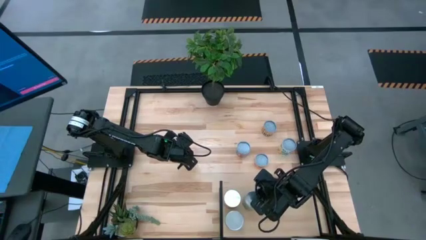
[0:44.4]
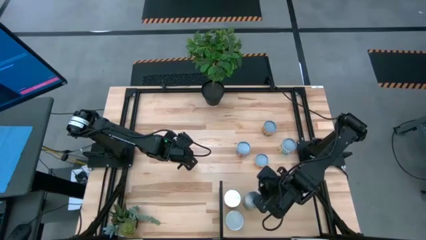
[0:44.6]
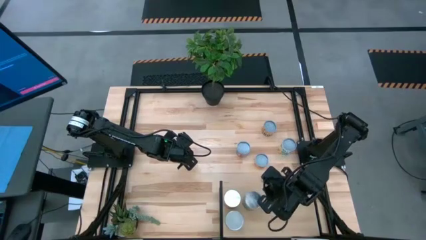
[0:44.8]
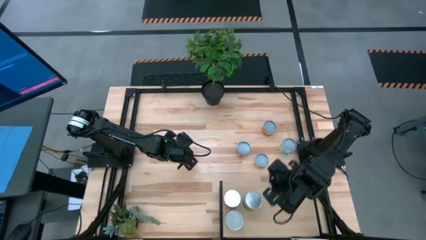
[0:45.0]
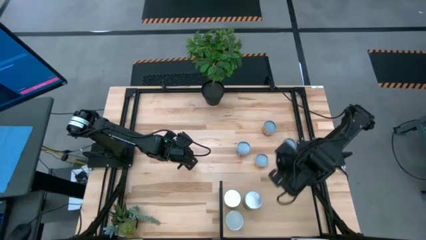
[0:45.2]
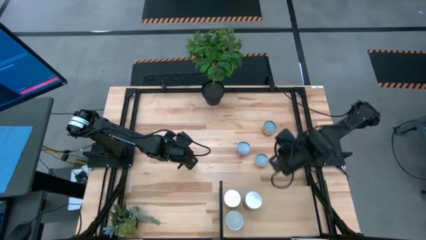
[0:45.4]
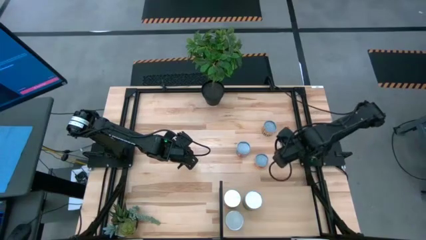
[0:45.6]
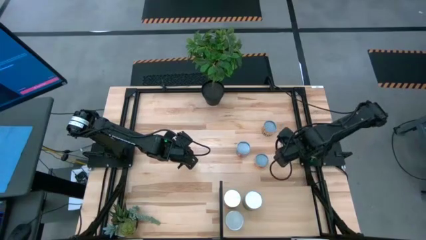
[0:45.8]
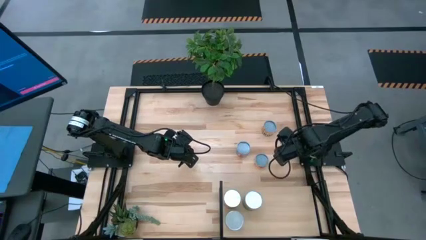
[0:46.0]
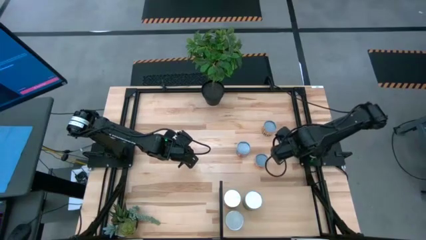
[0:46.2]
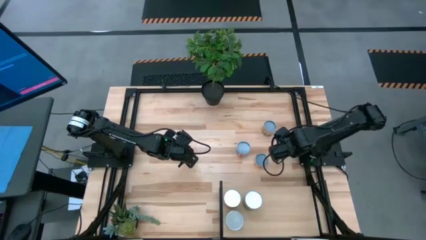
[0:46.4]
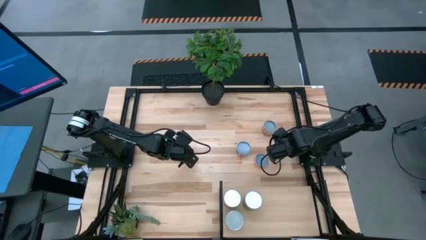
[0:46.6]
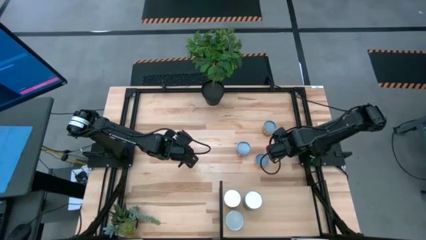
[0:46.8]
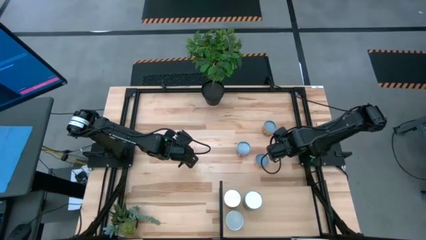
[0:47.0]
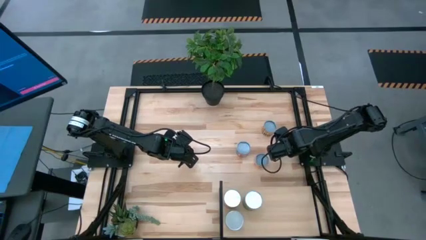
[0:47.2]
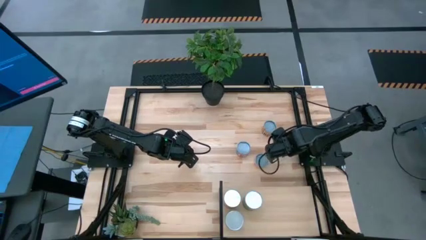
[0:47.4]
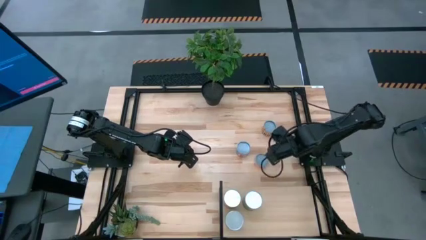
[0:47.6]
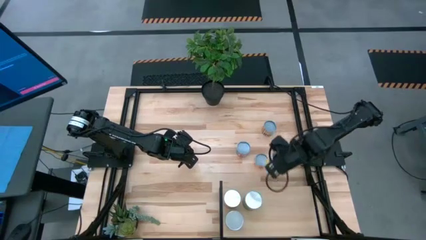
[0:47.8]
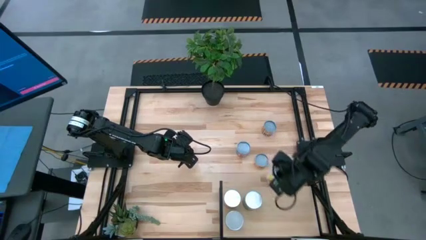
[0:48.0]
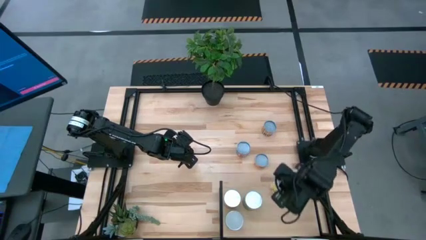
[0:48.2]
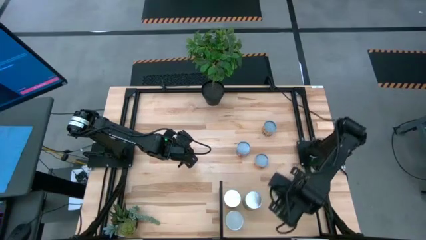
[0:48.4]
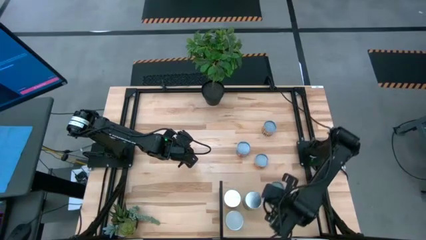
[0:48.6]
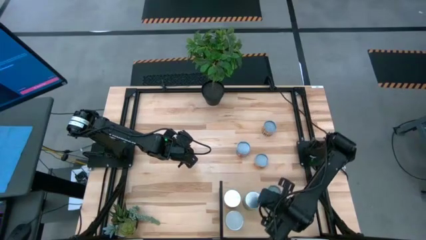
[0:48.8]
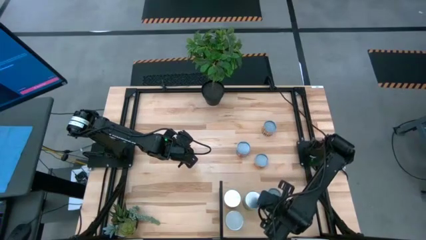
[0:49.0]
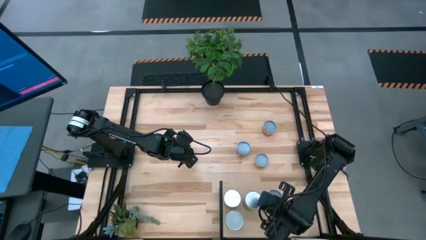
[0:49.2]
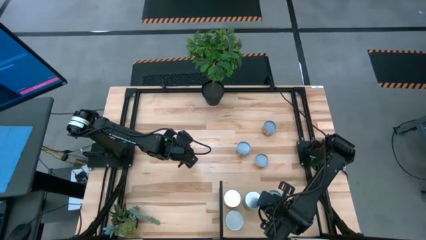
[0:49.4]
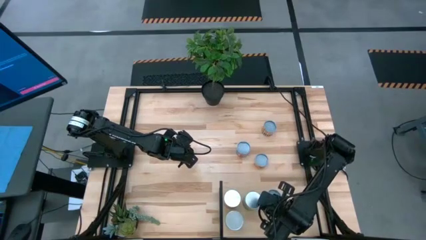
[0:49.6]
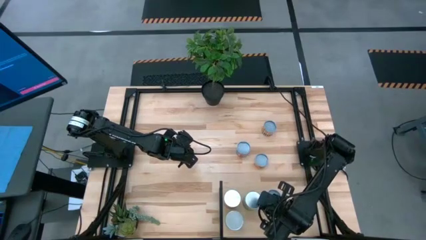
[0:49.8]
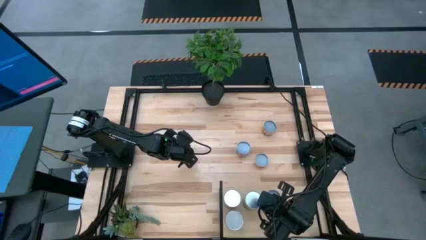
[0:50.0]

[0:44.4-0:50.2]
Task: Pick and place cans onto a shelf
Put the canned mixed fruits on the shelf

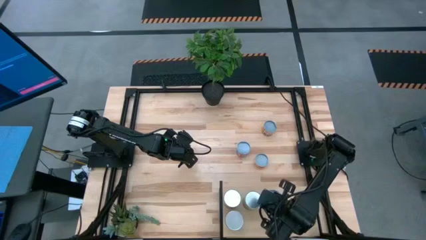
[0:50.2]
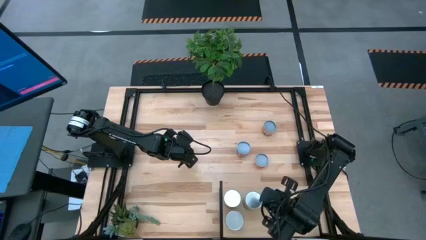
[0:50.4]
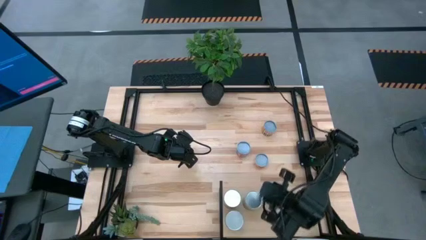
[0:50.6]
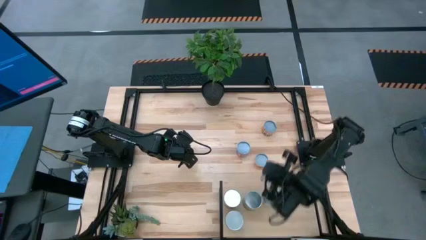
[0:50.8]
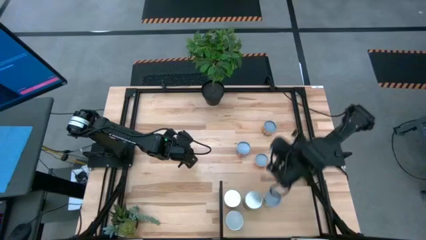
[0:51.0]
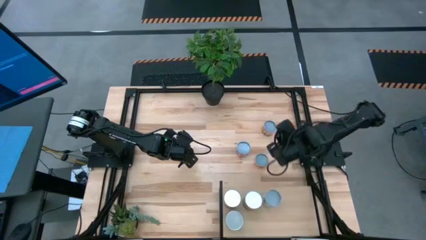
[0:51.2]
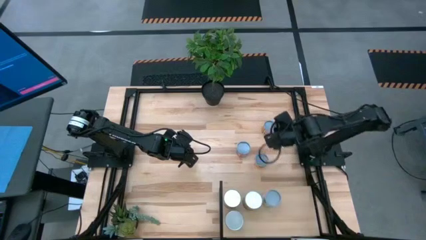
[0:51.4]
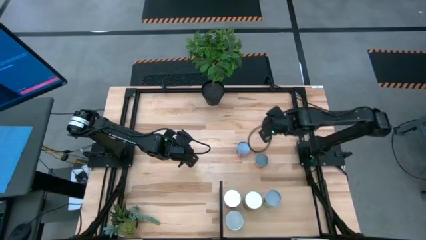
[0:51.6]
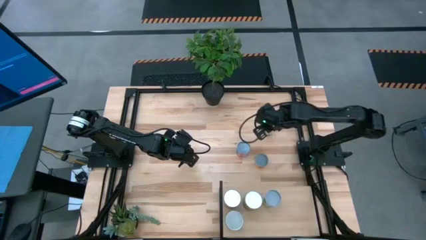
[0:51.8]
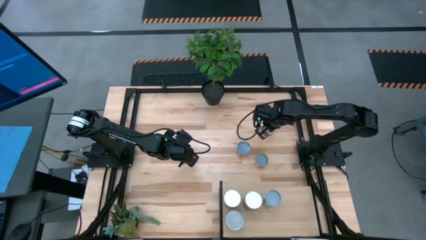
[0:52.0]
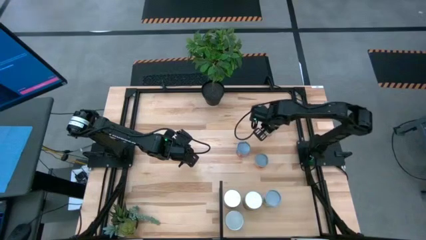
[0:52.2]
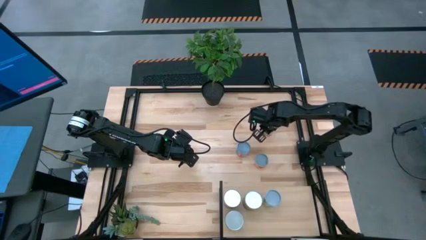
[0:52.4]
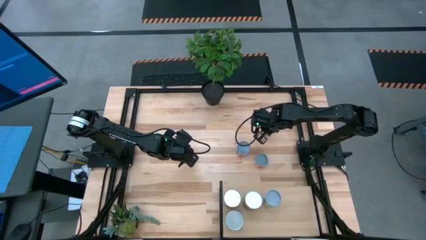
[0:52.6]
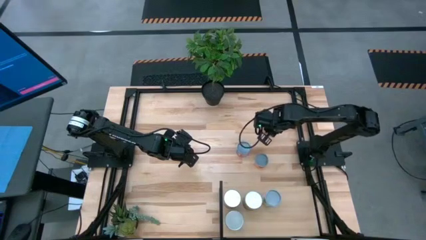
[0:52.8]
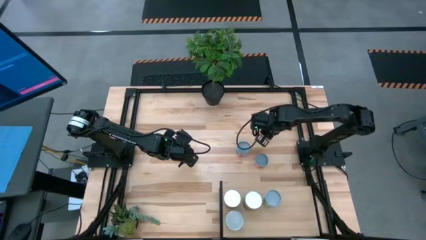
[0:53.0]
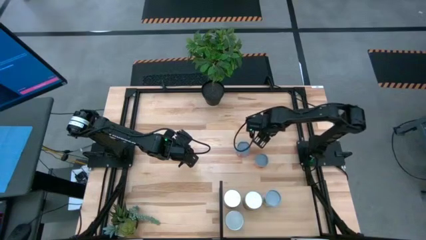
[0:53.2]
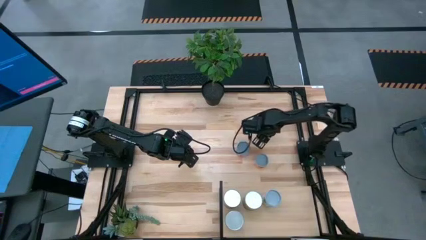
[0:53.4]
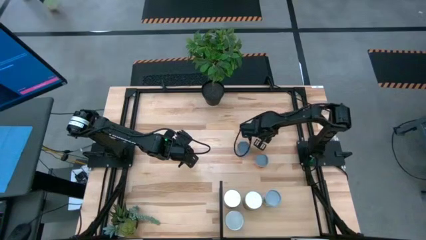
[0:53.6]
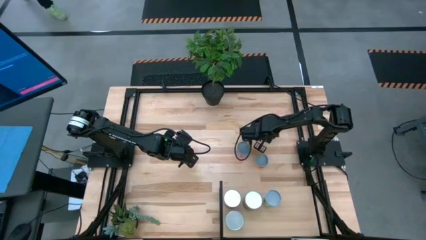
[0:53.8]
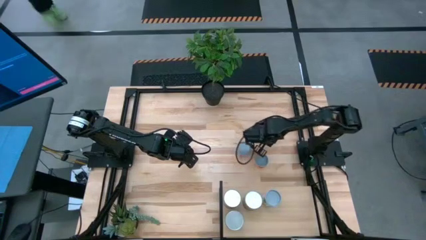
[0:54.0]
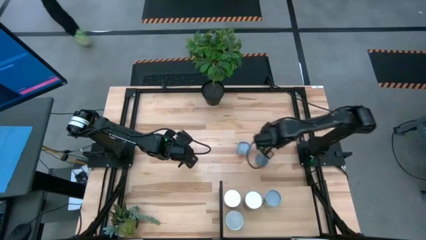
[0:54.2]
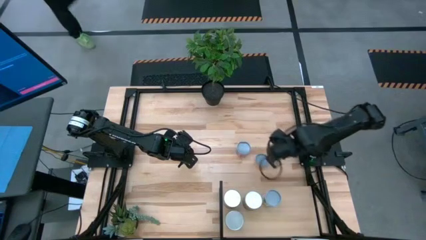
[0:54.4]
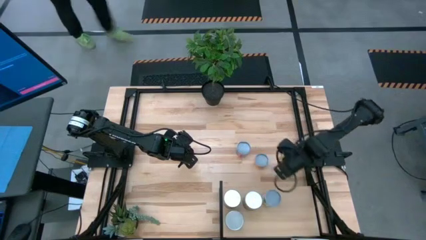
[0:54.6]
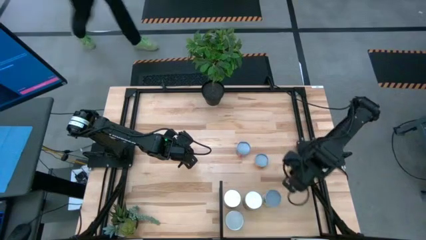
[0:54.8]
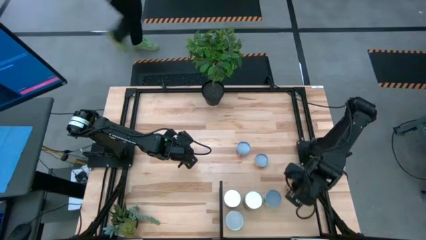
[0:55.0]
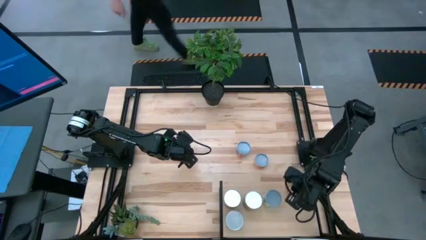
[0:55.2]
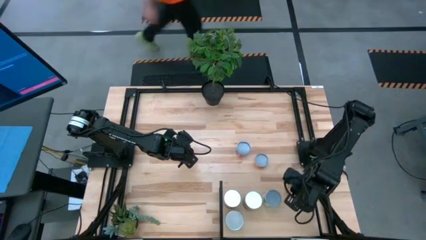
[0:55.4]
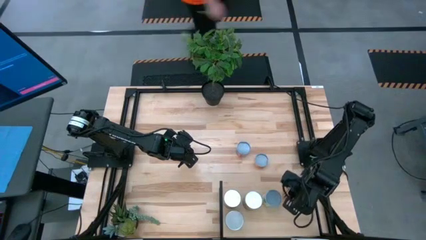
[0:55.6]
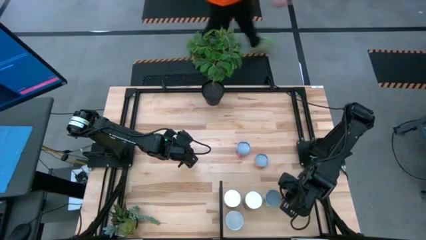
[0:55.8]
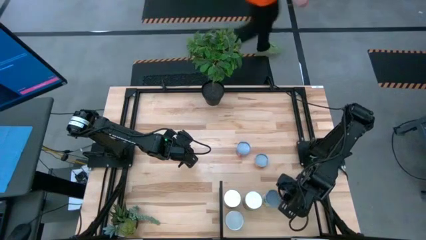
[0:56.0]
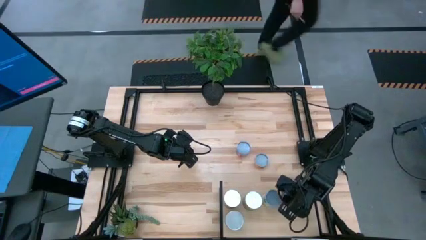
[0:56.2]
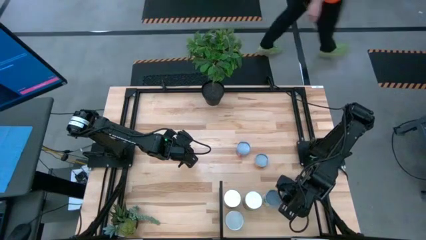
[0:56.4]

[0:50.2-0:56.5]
Put the canned beans on the shelf

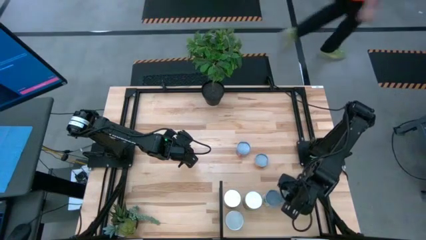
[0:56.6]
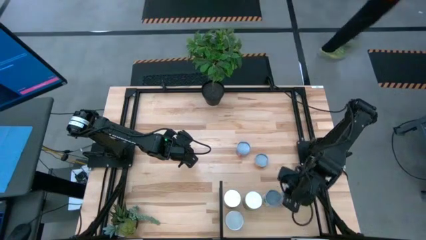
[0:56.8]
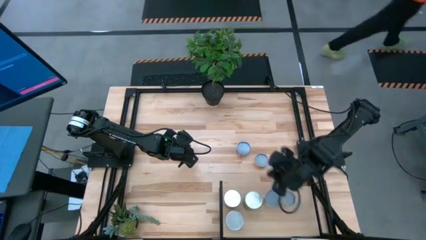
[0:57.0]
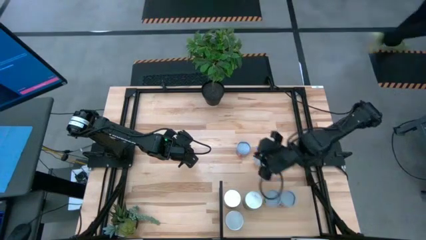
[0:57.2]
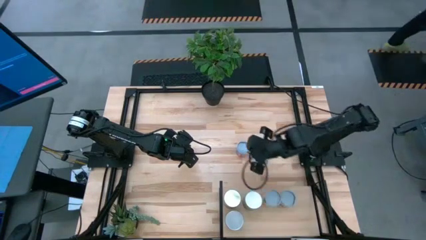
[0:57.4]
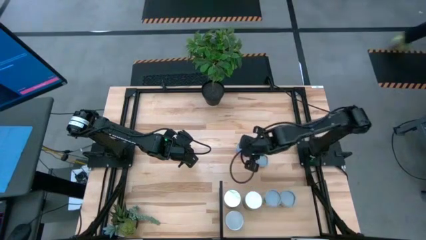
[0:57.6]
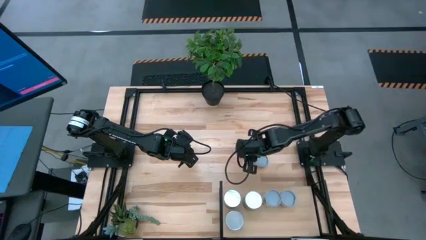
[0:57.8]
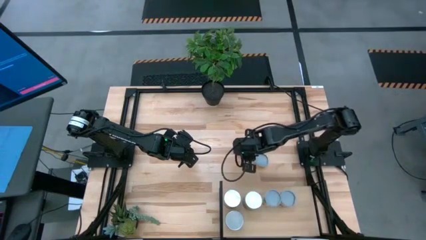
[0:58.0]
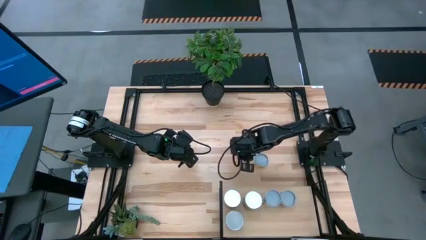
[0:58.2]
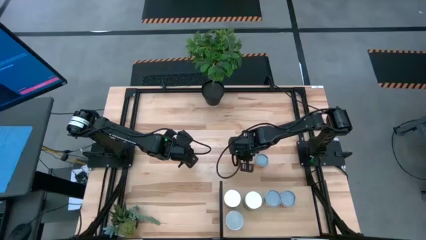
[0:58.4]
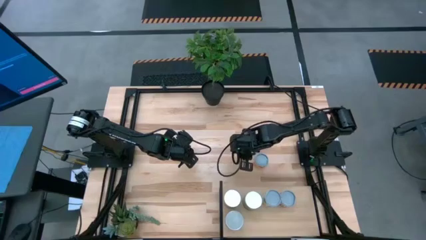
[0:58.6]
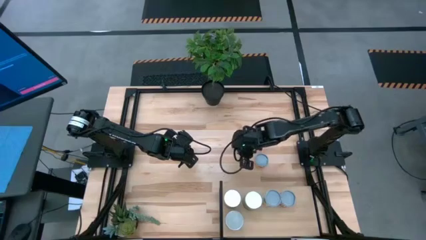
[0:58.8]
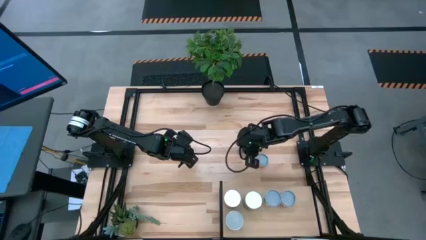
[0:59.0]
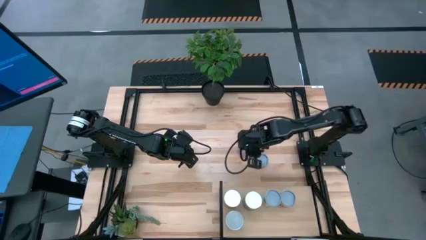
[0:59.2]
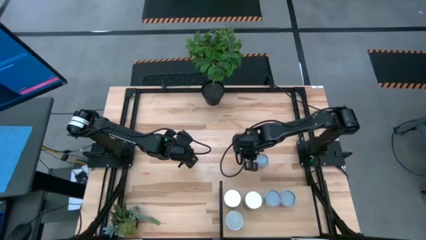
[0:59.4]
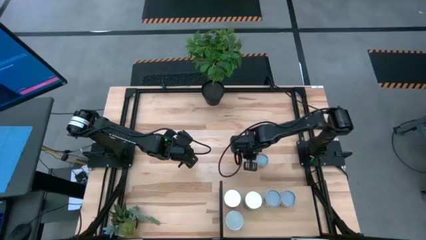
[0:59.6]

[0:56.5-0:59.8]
Put the canned corn on the shelf

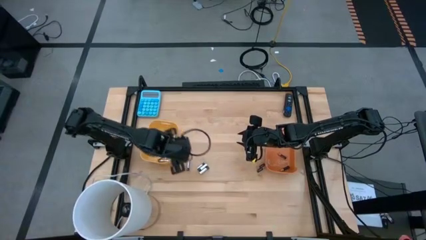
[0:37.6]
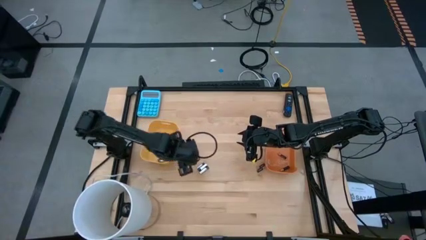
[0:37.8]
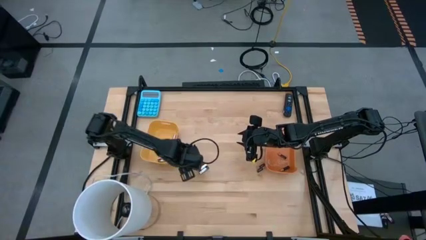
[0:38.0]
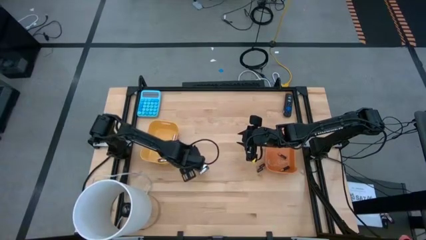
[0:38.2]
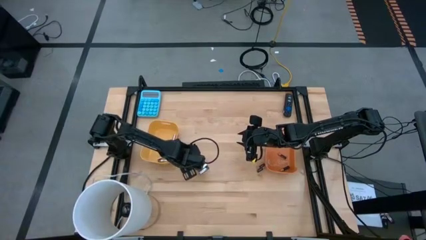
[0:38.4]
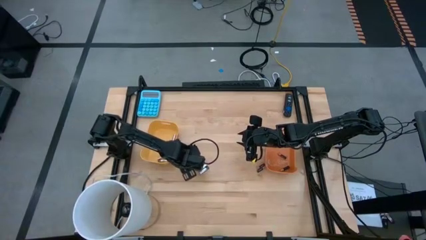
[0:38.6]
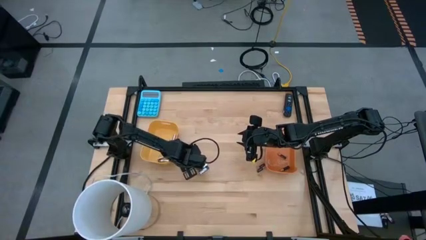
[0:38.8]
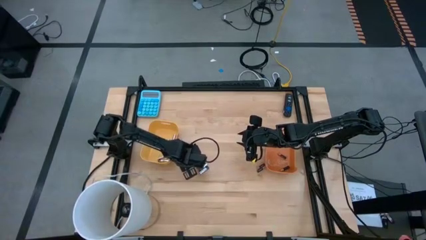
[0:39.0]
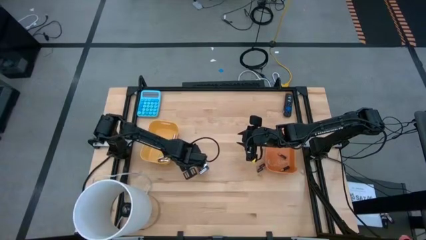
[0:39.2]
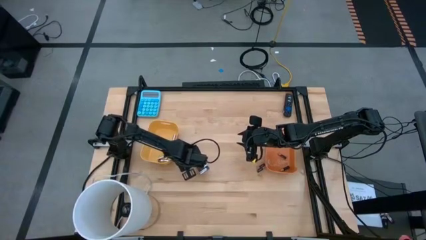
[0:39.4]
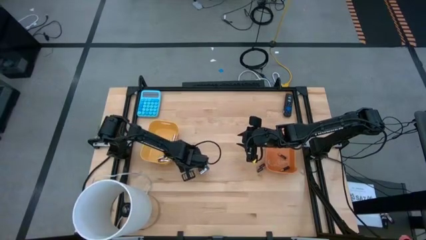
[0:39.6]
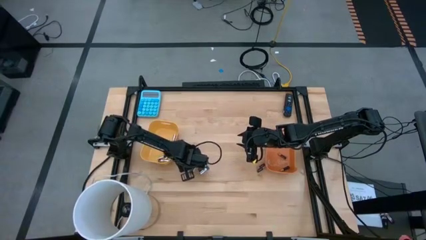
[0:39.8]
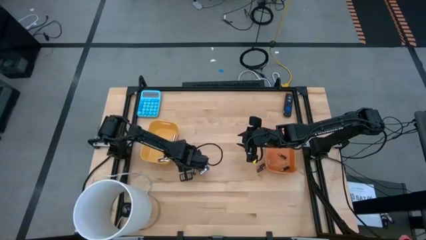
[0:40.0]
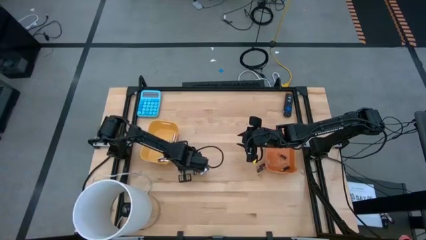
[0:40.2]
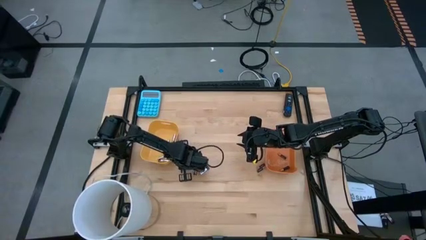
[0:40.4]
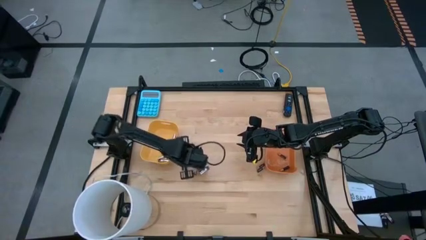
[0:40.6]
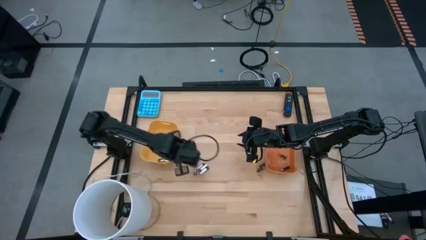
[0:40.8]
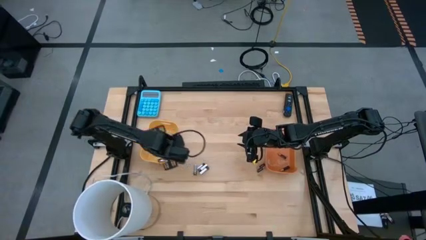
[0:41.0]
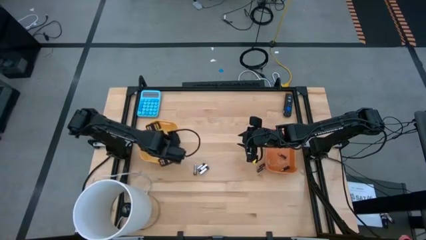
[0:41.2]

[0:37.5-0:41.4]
Task: Sort batteries
Put the silver battery into the yellow bin
